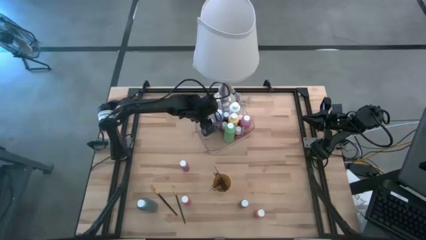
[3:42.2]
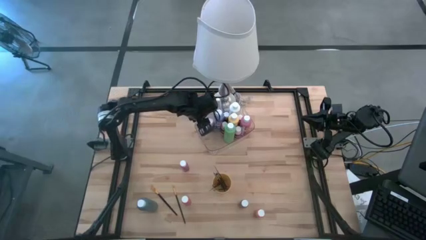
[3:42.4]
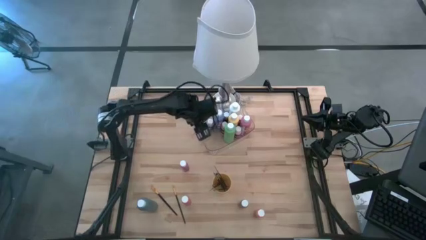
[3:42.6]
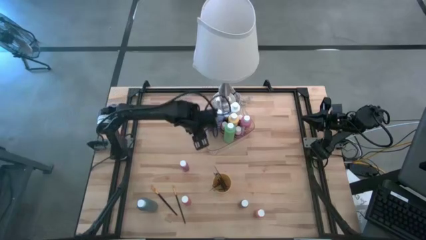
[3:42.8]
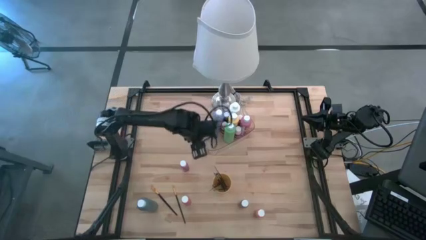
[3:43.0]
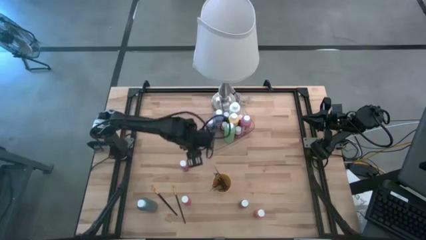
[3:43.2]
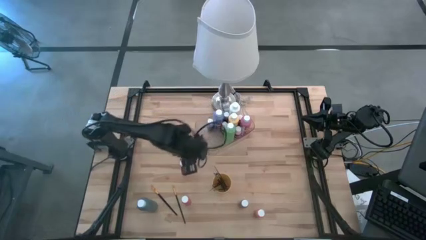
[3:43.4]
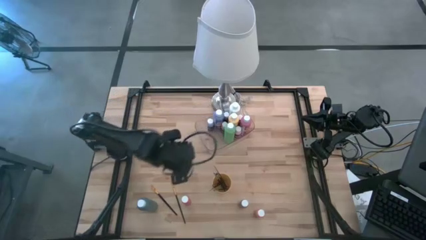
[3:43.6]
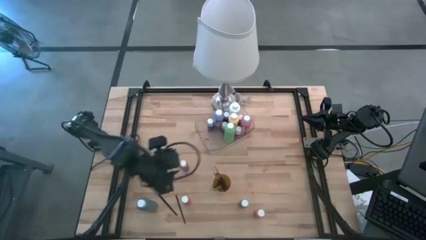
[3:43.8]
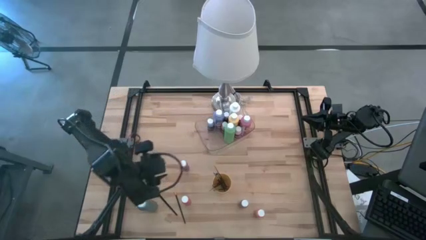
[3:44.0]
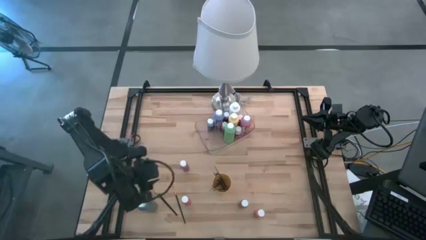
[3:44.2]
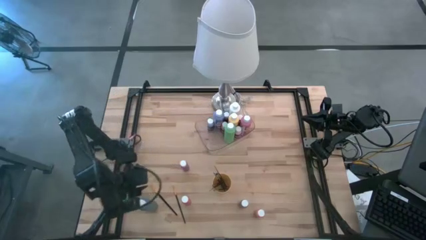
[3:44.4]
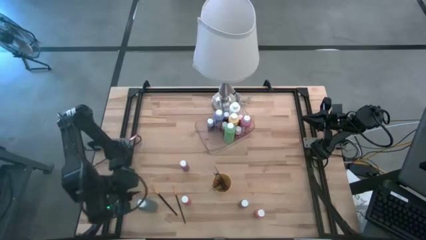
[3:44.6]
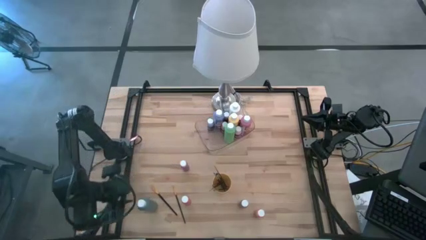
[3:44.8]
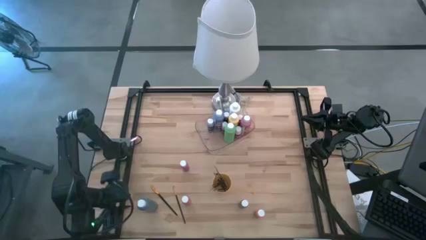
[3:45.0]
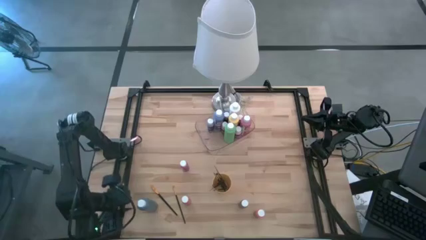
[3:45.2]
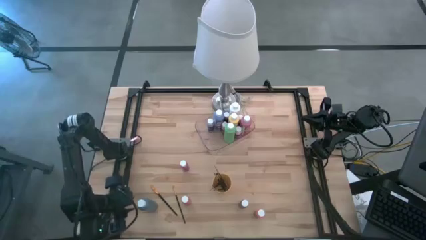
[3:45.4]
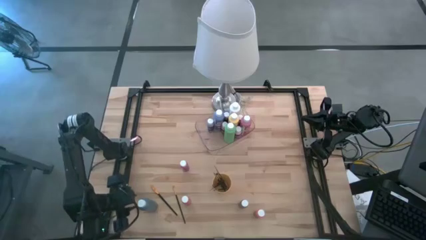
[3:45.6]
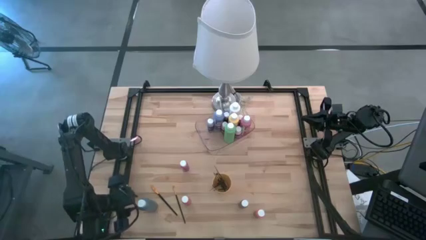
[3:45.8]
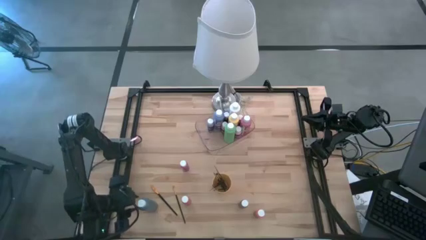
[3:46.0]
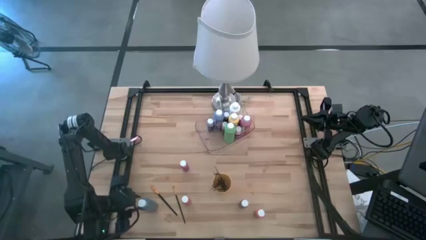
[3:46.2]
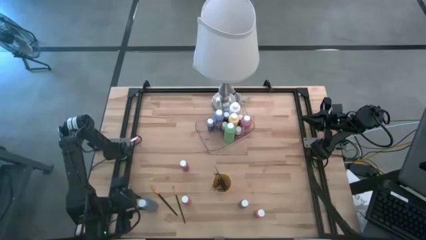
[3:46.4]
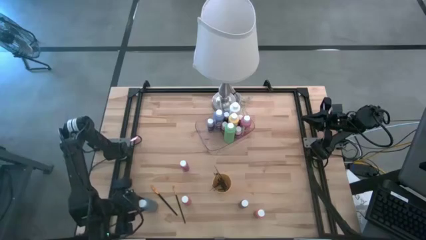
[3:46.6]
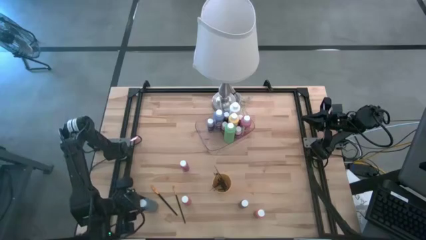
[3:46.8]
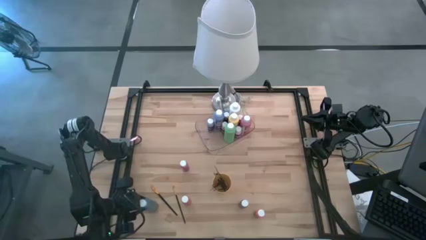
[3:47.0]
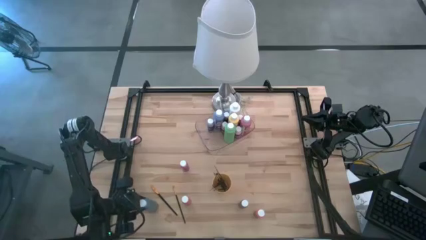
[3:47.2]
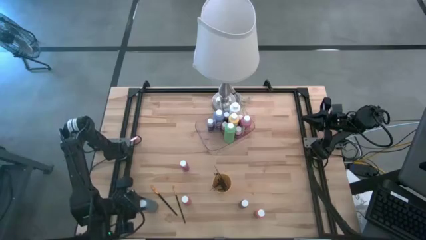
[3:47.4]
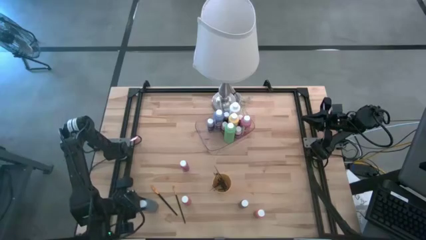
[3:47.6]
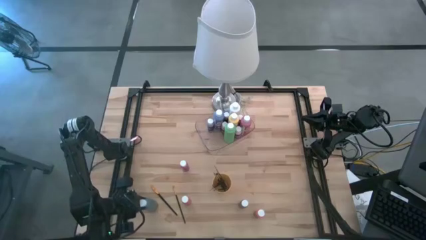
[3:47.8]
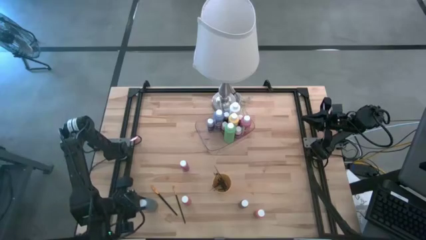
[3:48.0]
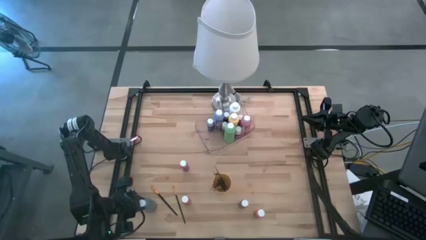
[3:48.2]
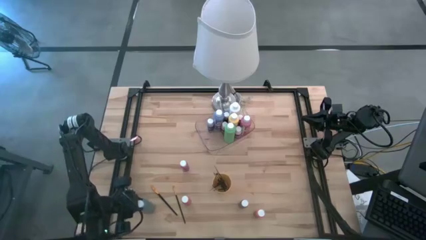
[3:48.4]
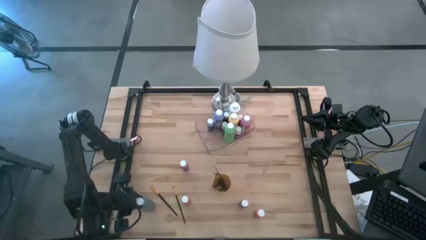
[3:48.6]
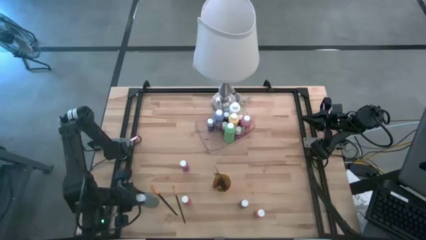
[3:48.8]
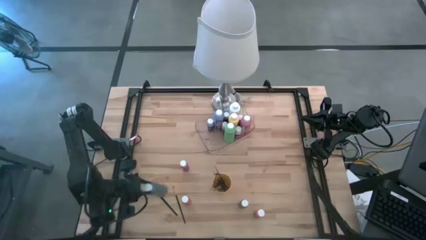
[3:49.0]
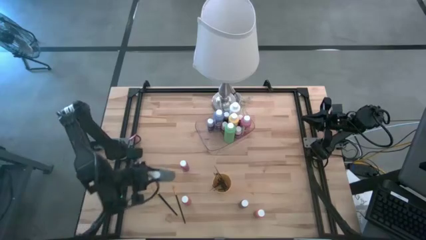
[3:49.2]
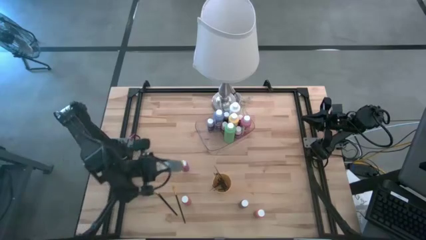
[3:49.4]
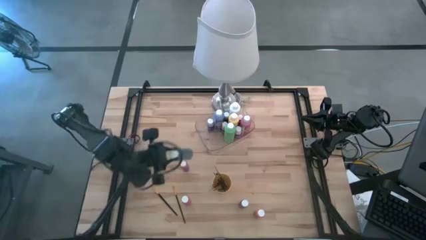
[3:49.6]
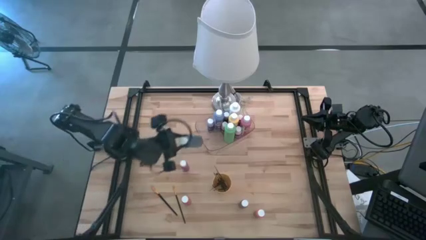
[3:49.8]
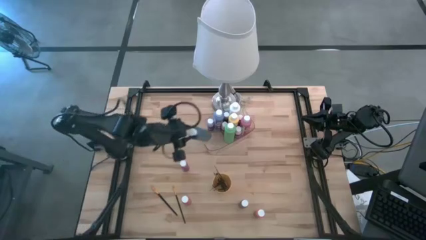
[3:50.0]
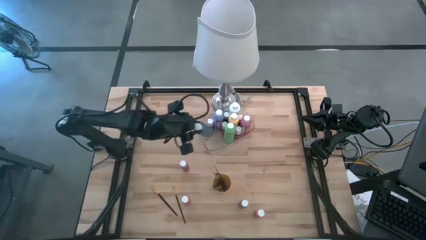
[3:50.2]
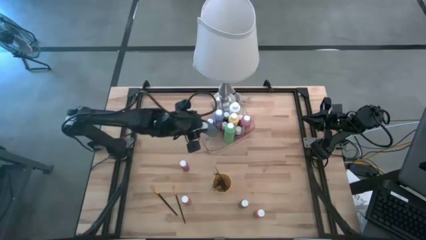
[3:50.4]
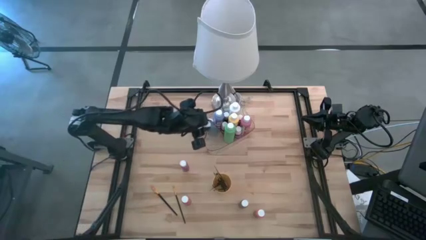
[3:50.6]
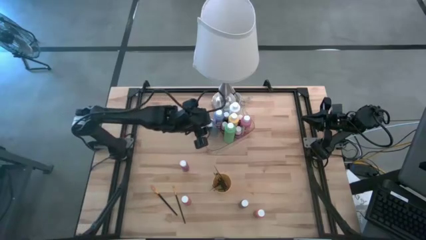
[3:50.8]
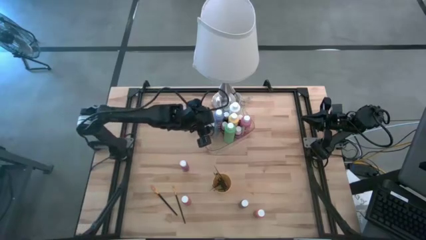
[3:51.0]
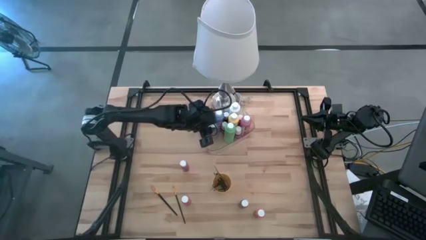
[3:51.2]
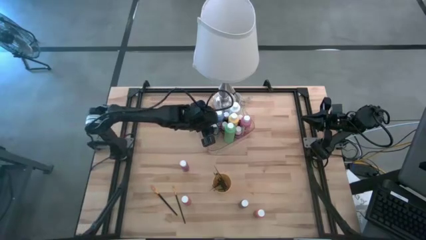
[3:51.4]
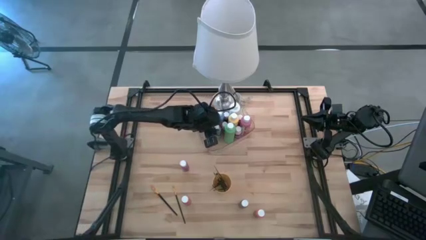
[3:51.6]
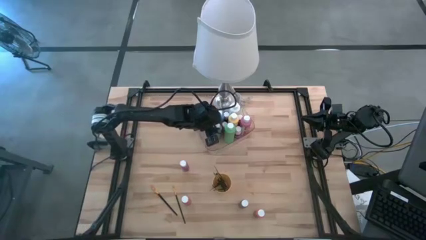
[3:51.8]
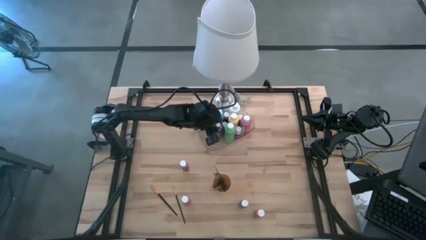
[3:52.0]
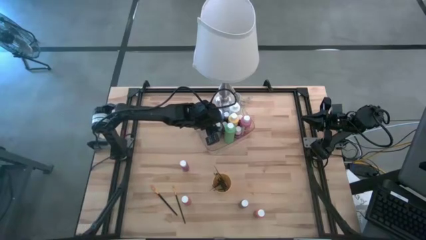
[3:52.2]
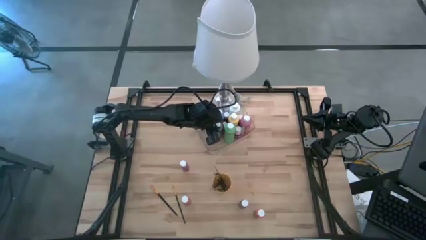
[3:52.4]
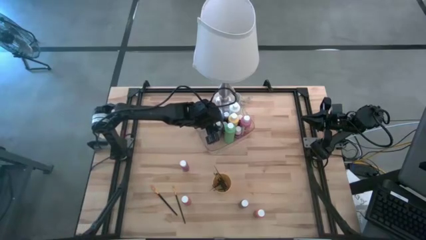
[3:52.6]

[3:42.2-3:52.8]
Task: Pick & Place Paint Supplies
Put the dark green bottle into the transparent bin

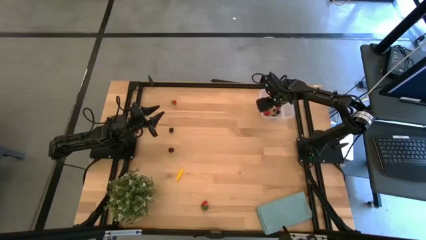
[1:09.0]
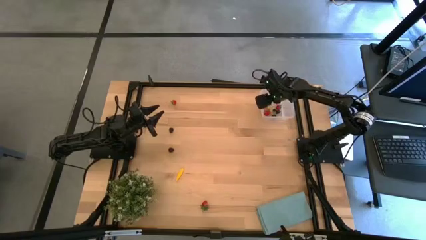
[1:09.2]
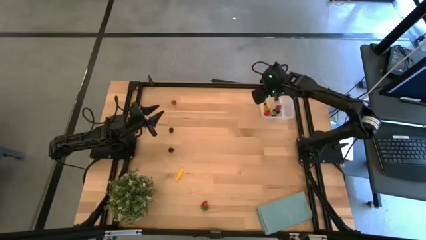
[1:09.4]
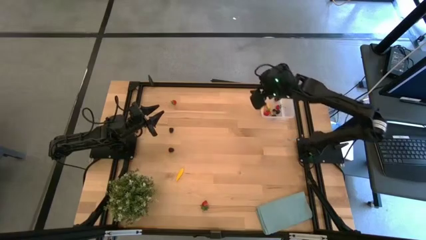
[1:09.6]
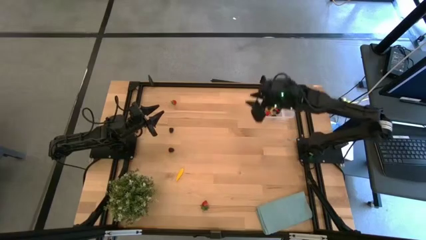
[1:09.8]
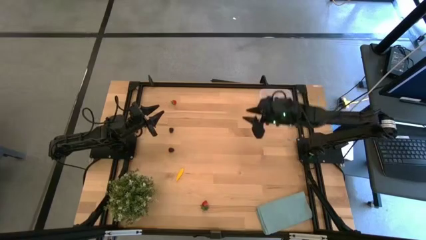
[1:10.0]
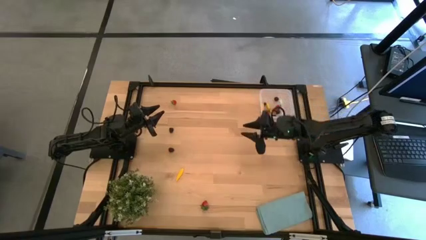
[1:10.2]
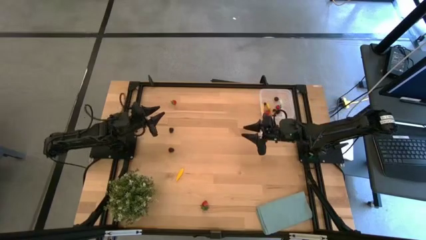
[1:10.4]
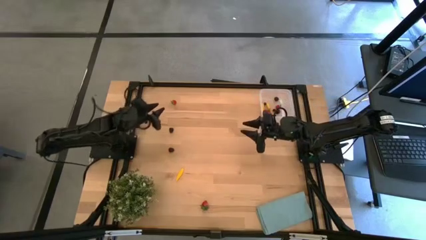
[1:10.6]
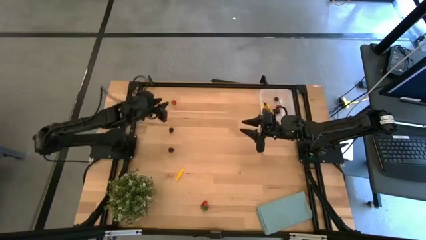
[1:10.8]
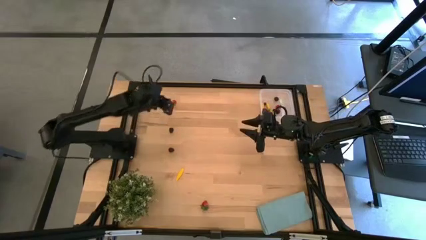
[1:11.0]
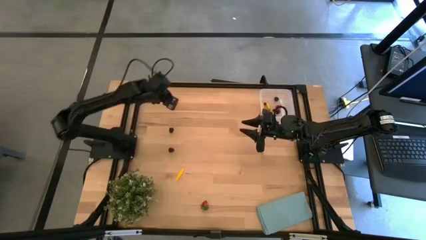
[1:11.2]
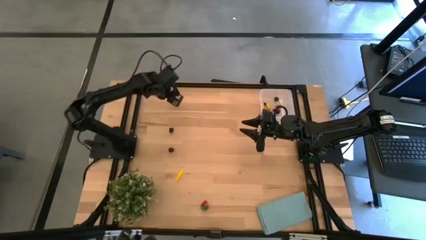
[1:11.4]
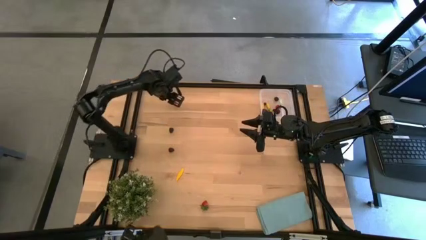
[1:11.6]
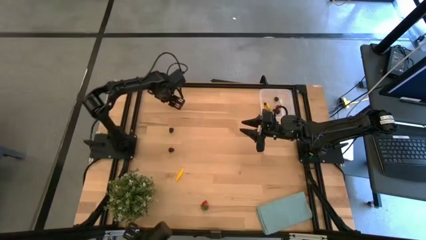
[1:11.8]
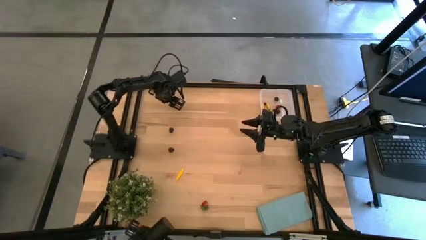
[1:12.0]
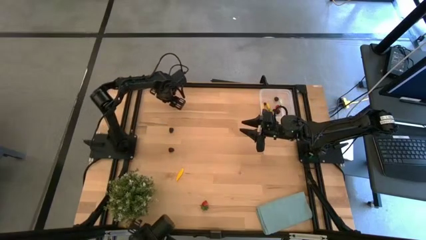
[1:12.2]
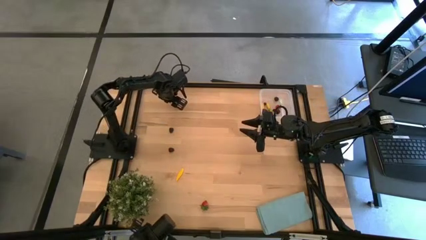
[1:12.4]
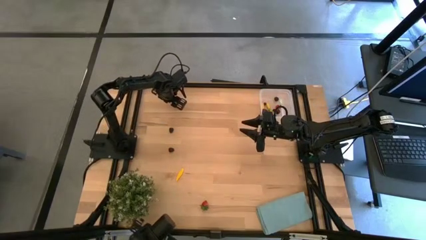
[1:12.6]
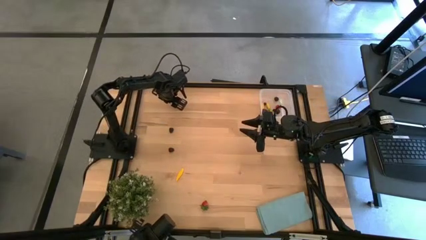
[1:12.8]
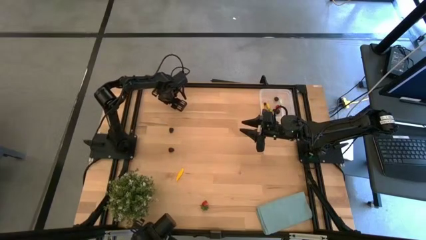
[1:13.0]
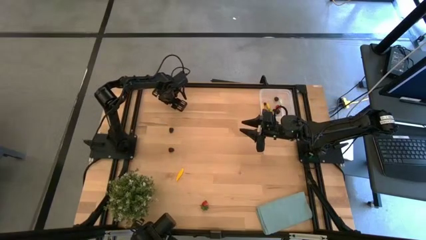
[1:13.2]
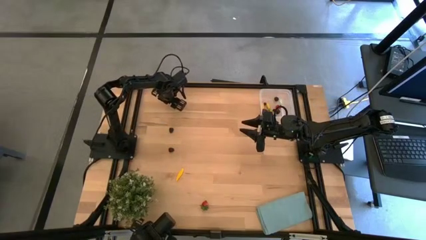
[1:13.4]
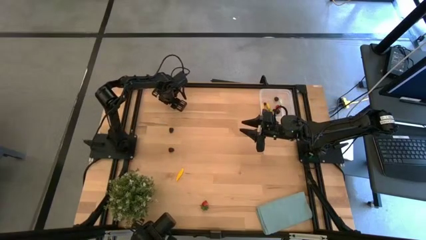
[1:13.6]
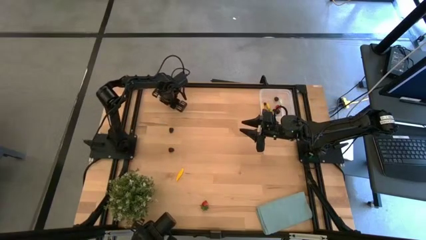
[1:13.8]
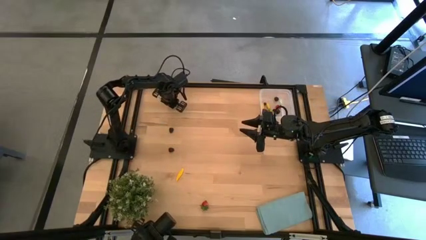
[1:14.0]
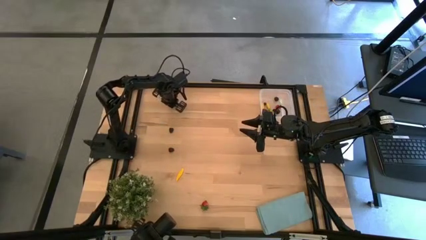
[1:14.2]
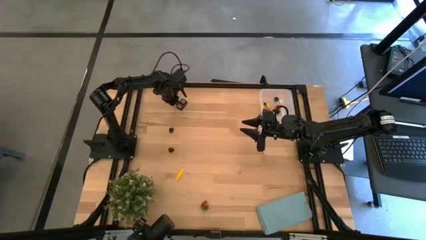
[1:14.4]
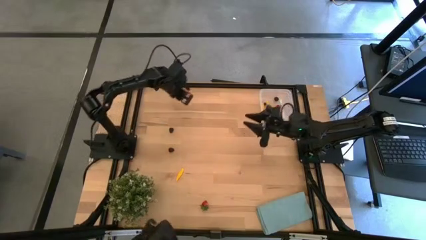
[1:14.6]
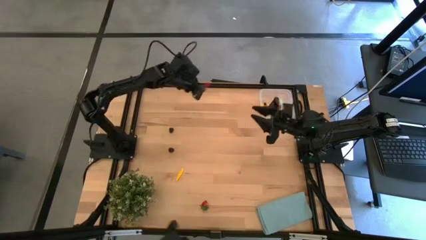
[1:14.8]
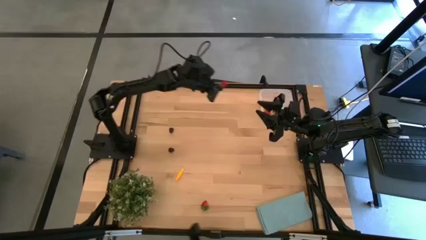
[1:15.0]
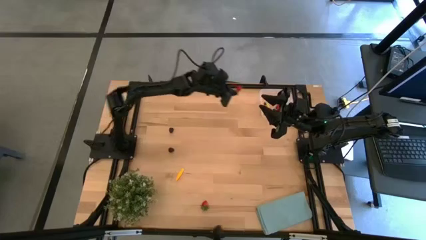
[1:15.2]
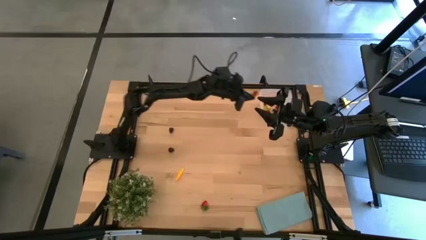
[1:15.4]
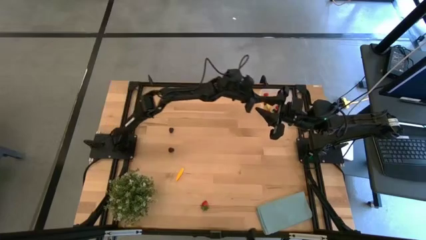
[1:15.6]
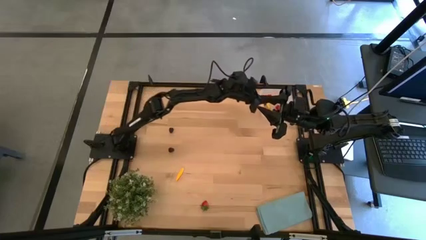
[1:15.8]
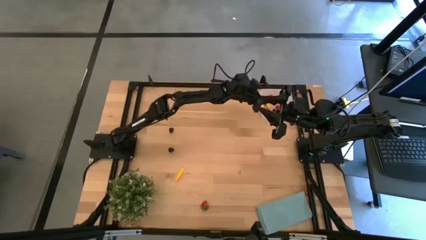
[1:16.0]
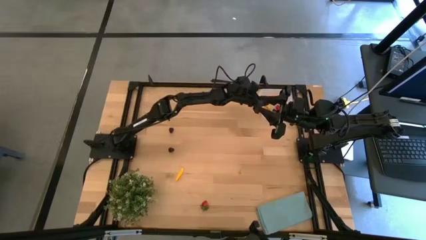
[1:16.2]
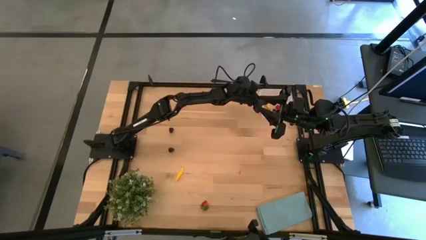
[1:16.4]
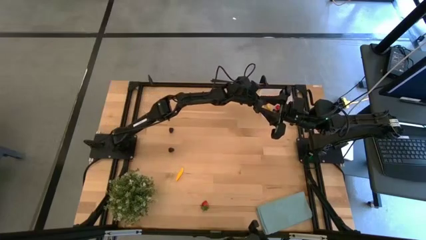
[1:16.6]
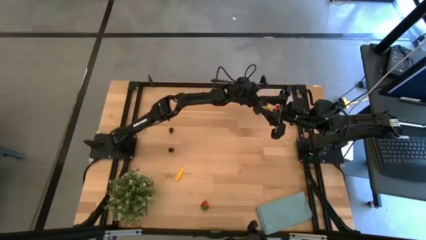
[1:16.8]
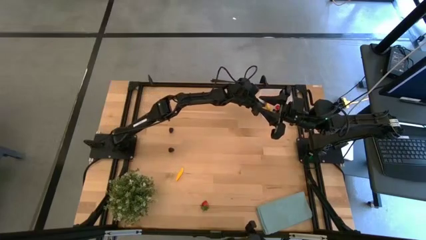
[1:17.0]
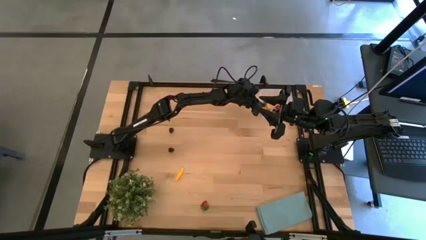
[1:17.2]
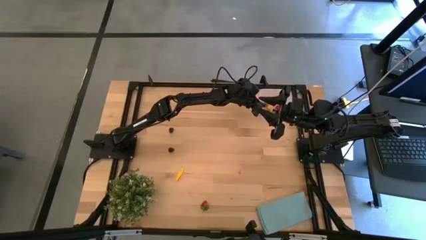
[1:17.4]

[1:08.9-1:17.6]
Task: Pick and placing Produce into tupperware
Put the red strawberry into the transparent bin
